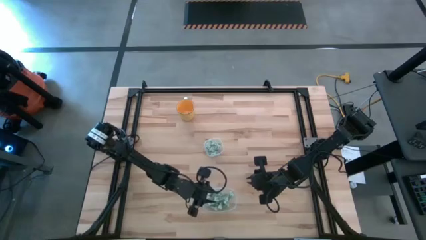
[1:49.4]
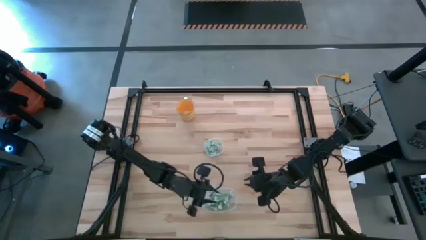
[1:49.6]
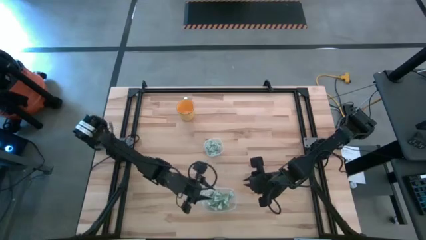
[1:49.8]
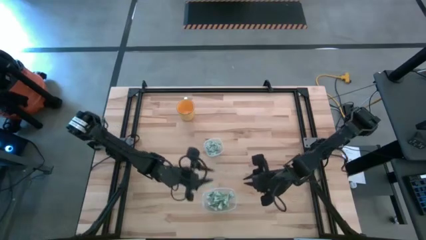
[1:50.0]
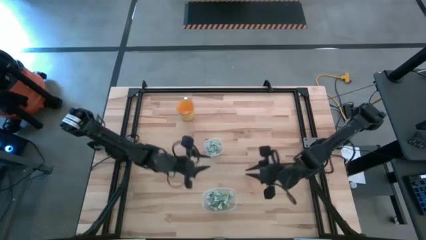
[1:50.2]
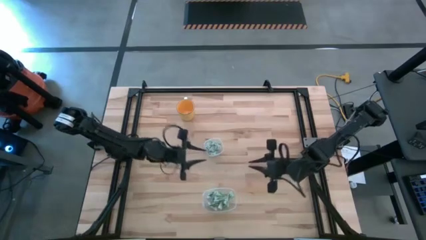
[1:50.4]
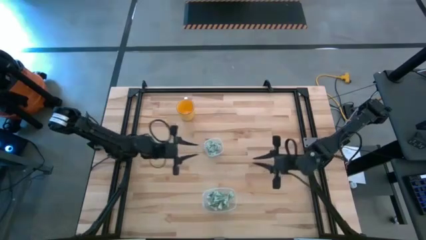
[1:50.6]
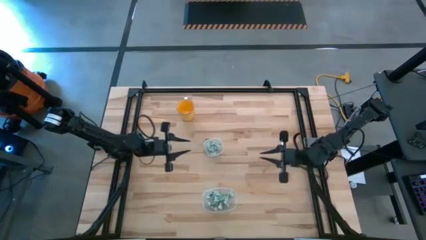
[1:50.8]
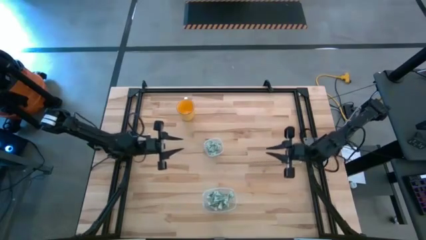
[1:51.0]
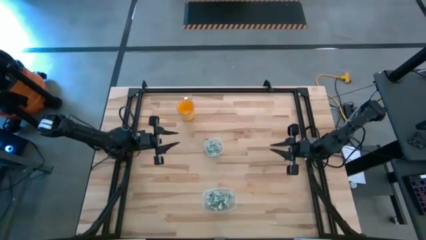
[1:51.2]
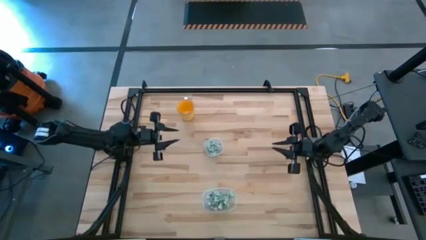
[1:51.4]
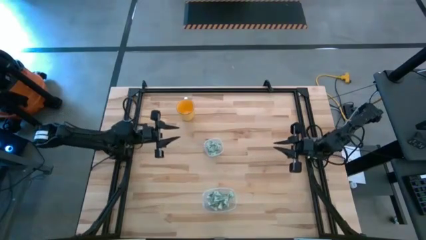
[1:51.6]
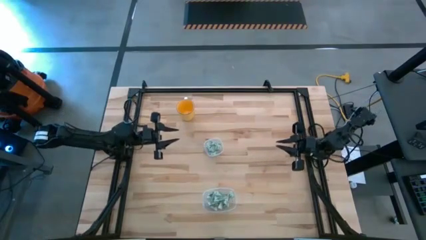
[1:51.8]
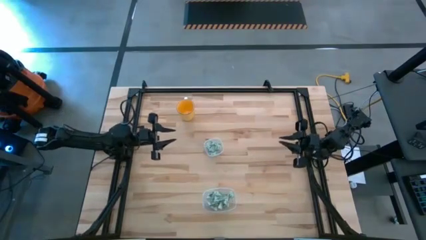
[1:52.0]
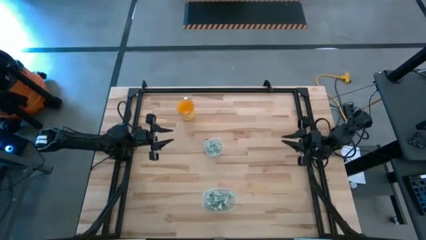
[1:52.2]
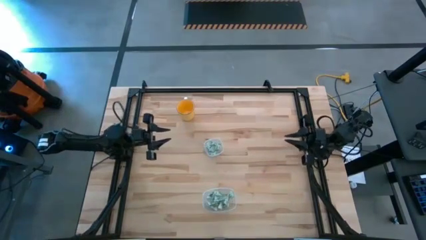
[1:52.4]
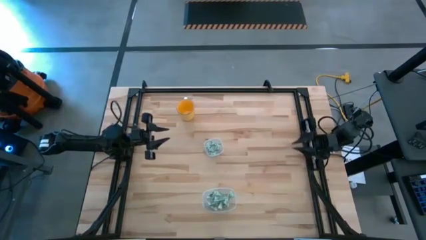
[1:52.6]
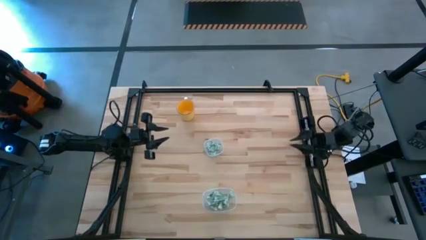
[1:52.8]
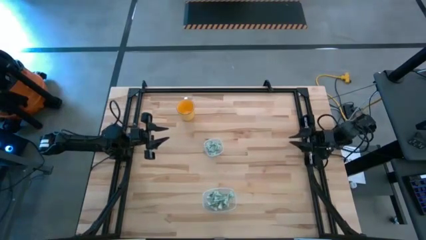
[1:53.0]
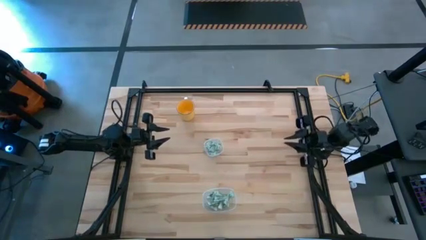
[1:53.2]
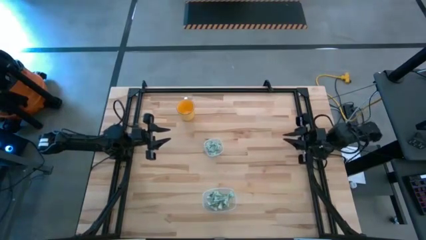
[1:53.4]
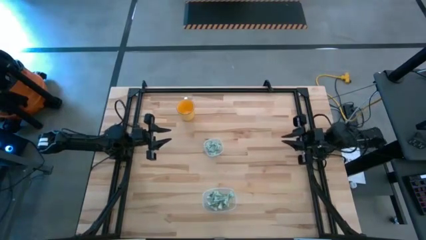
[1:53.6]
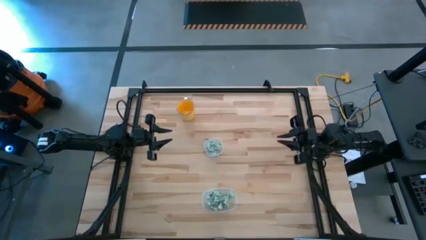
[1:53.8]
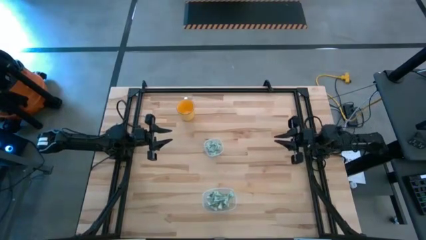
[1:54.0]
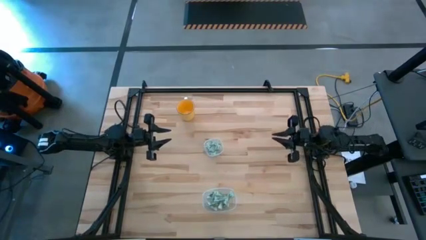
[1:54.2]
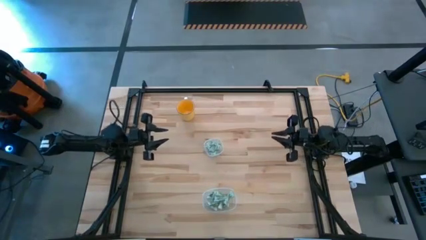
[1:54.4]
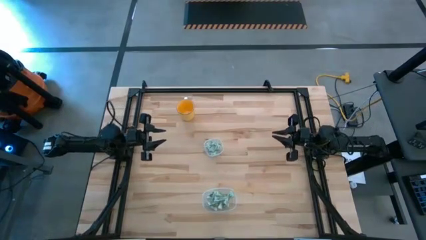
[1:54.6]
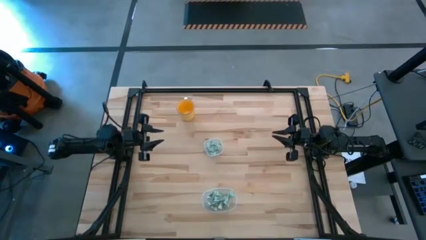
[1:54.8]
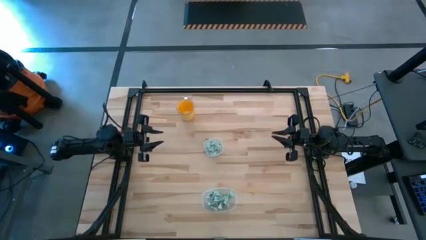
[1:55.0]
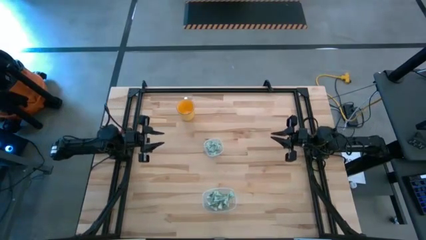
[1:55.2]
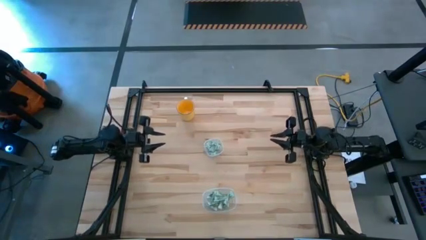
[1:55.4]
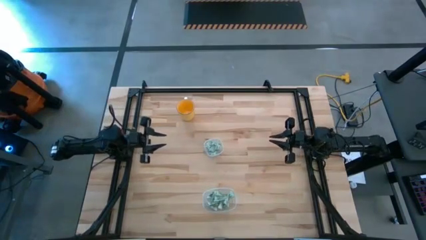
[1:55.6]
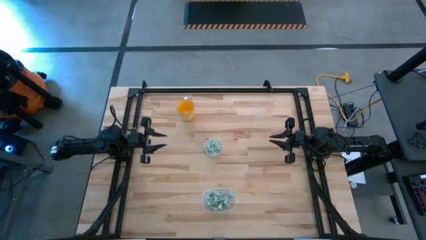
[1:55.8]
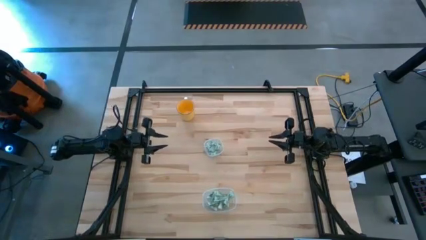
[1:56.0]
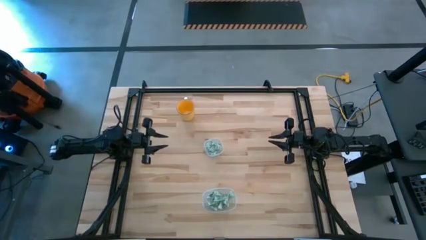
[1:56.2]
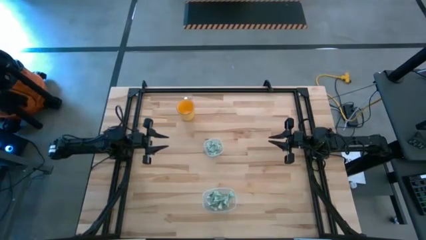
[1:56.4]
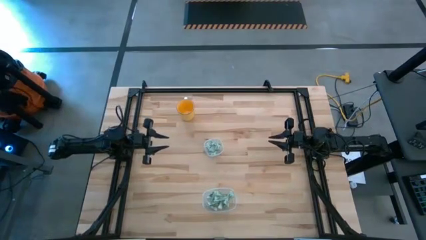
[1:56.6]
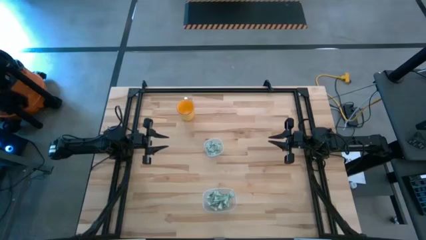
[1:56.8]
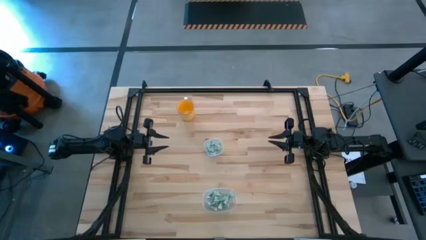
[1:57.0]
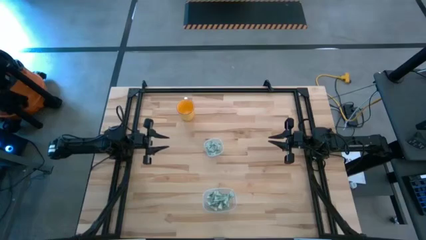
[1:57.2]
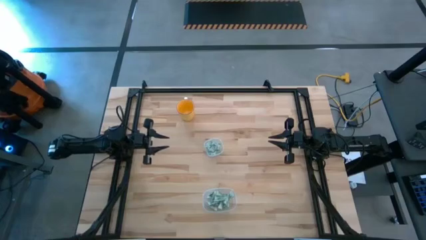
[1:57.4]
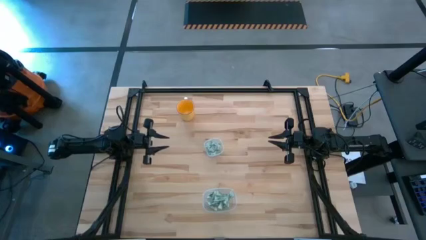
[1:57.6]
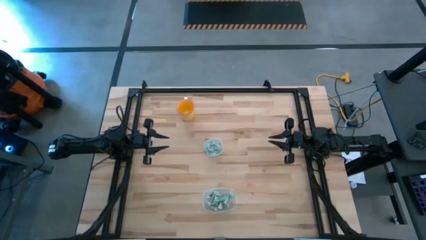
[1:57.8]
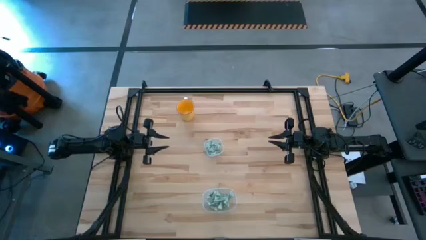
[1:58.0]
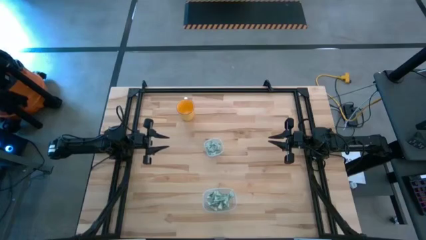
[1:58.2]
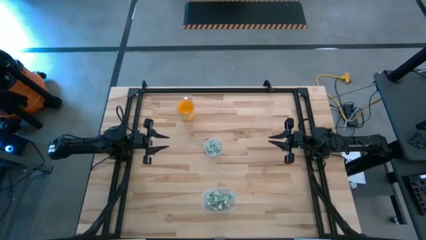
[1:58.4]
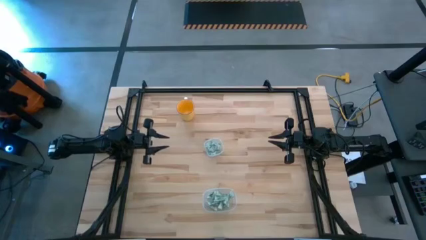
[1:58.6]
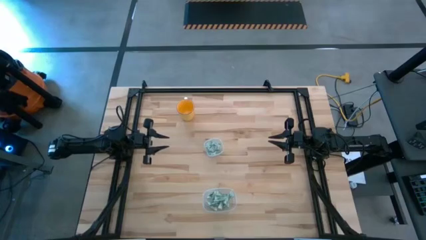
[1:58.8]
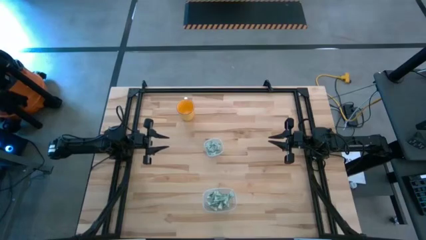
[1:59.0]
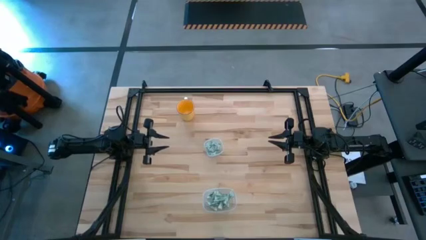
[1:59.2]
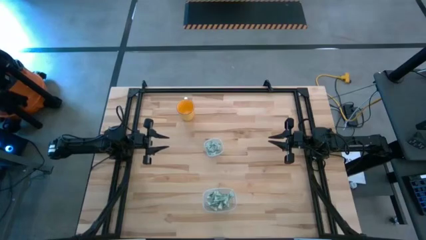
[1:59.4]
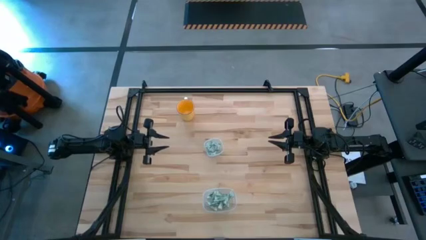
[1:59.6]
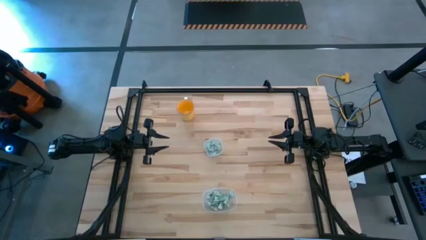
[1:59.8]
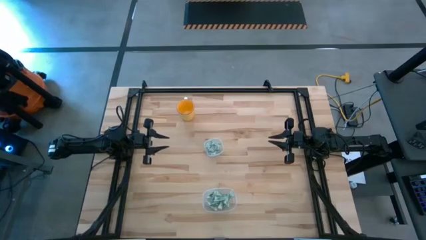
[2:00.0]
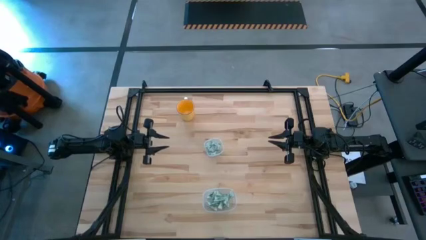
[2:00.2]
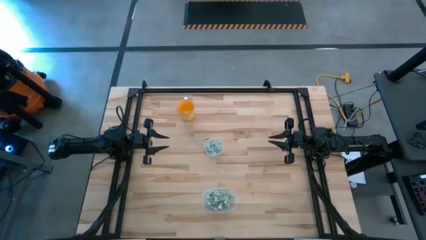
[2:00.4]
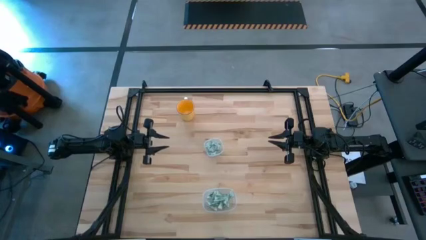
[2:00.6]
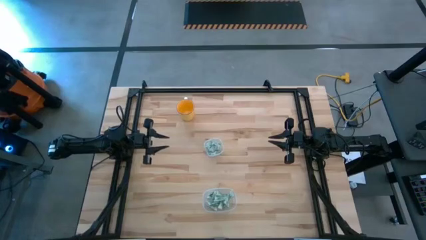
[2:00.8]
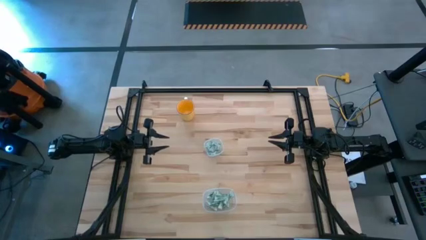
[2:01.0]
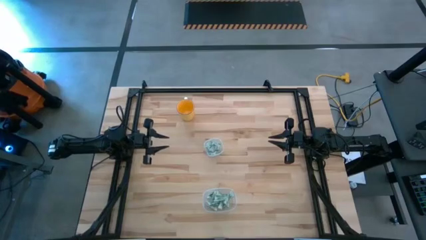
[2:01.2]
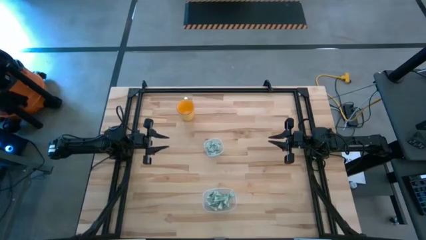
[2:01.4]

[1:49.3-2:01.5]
Return to Home Position

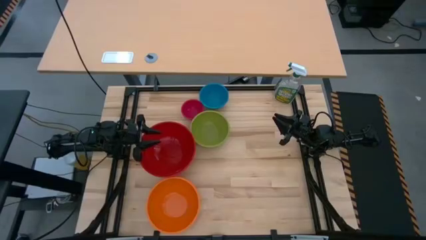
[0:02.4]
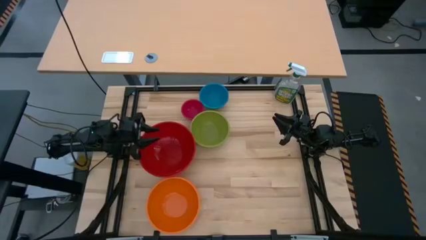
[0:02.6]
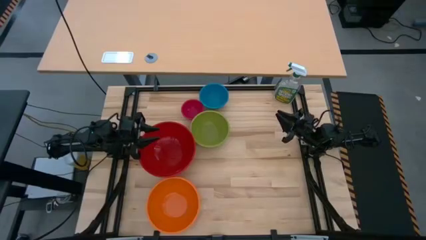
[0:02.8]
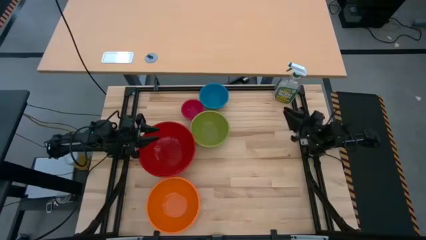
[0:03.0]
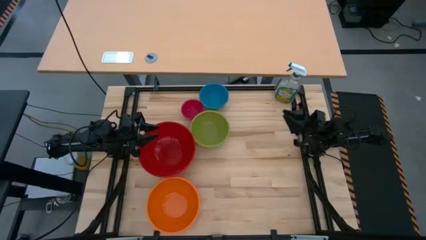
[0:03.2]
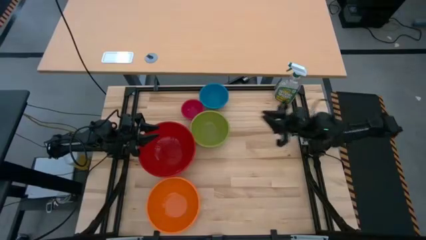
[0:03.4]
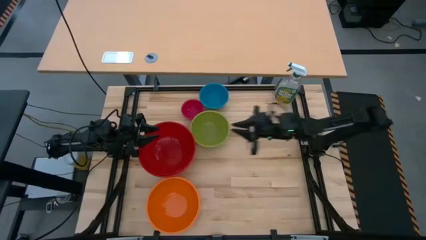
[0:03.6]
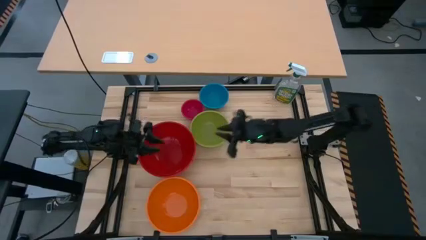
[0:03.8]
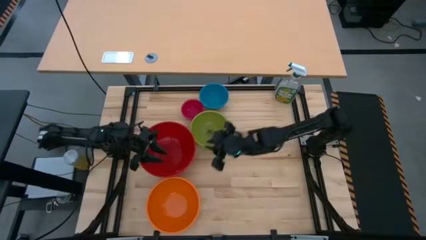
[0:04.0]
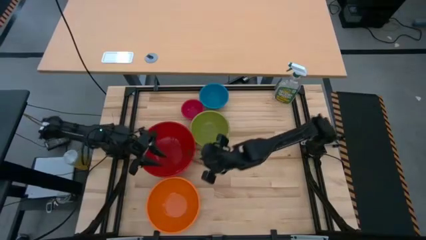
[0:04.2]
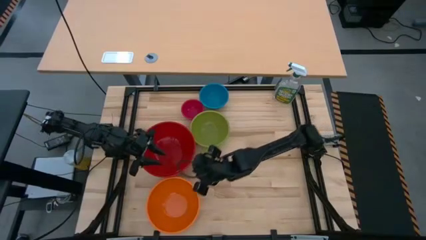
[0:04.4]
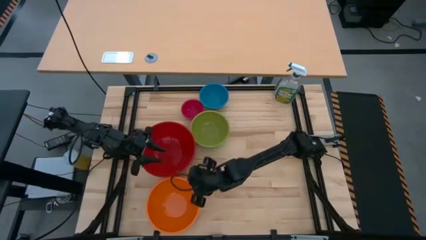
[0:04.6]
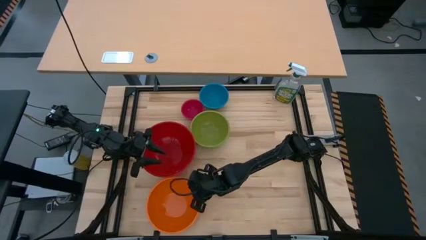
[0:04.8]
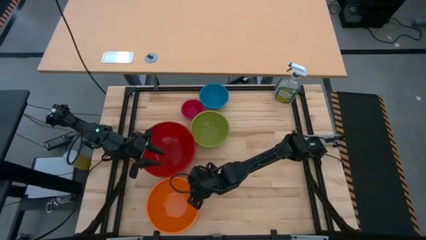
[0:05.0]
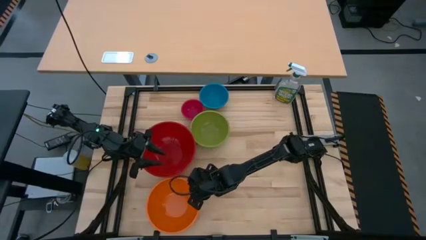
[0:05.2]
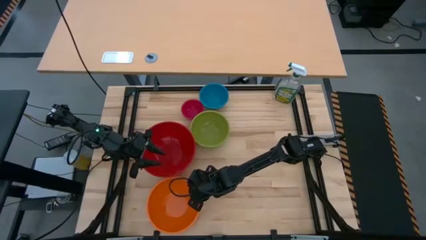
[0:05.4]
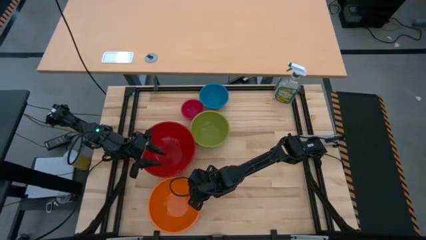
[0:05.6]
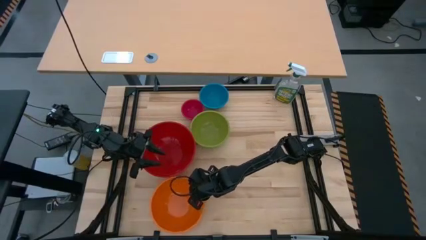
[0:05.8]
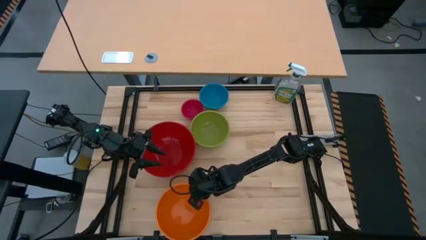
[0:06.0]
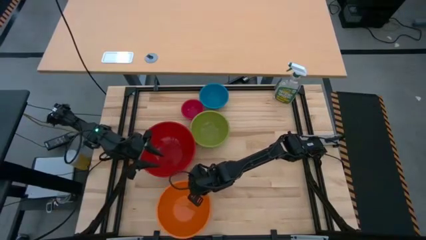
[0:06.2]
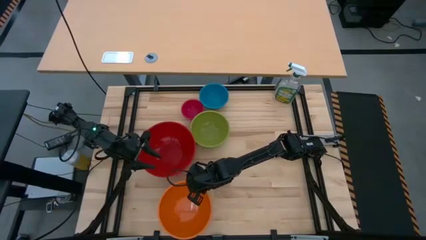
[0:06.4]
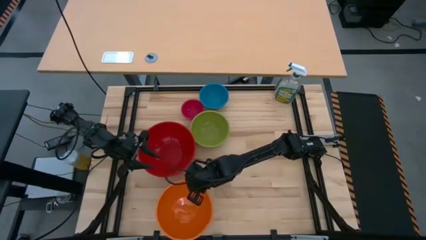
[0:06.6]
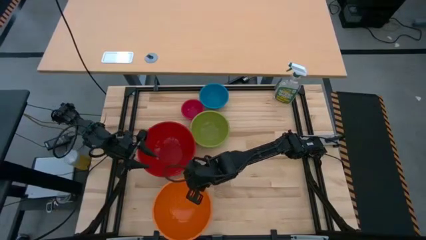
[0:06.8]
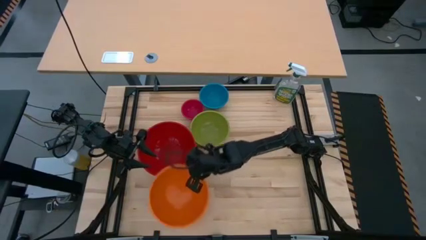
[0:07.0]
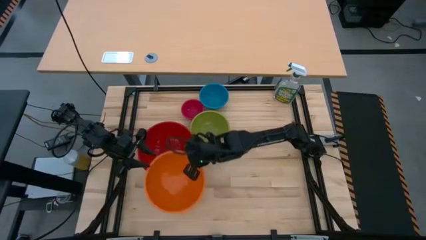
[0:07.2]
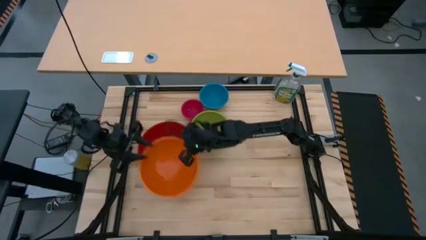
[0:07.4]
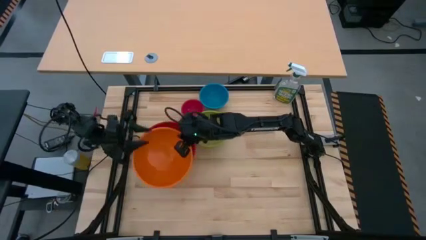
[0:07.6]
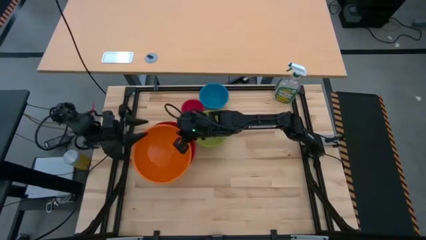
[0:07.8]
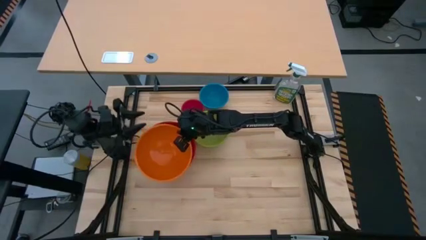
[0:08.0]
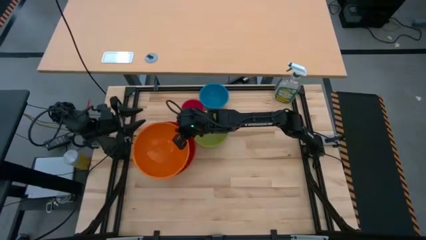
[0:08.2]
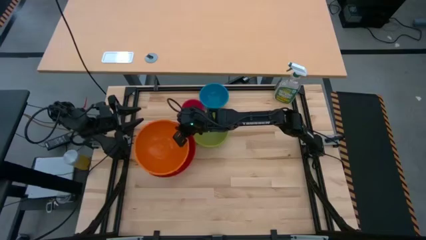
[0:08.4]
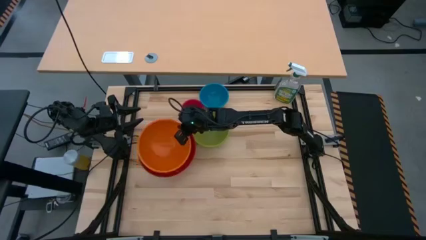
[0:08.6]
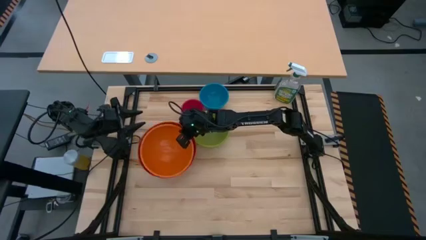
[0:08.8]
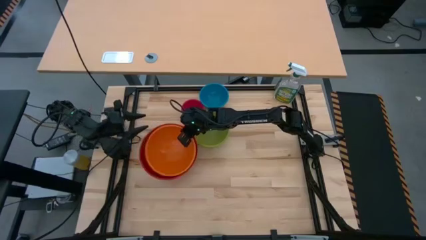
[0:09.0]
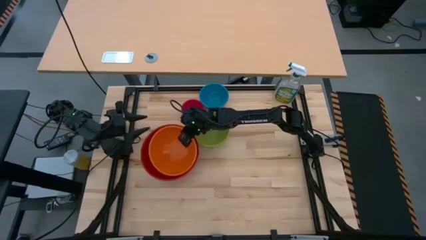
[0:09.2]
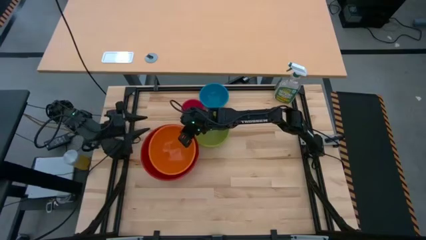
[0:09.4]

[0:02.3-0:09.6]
Stack the orange bowl on top of the red bowl
